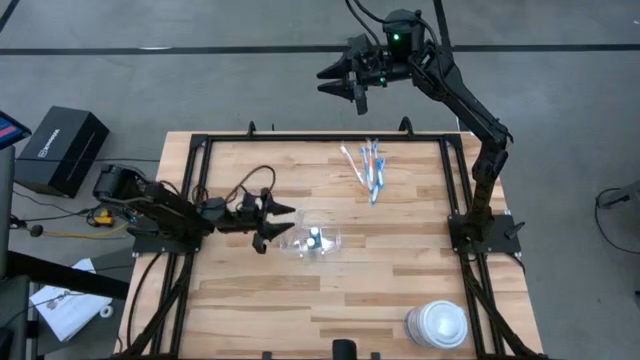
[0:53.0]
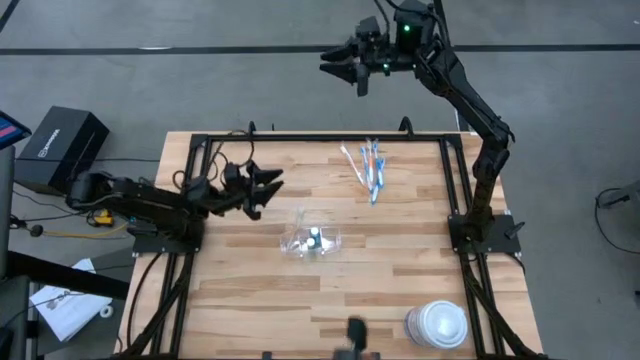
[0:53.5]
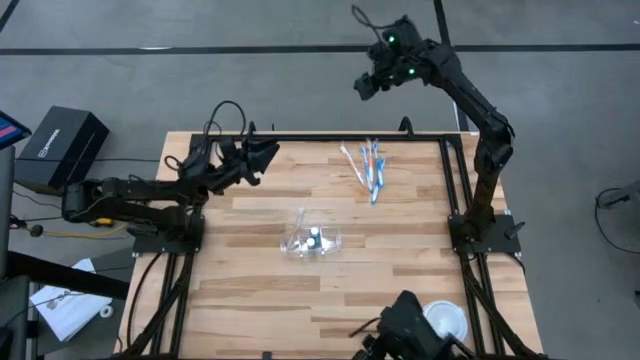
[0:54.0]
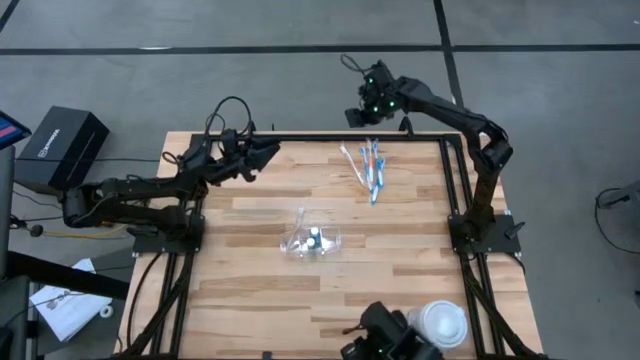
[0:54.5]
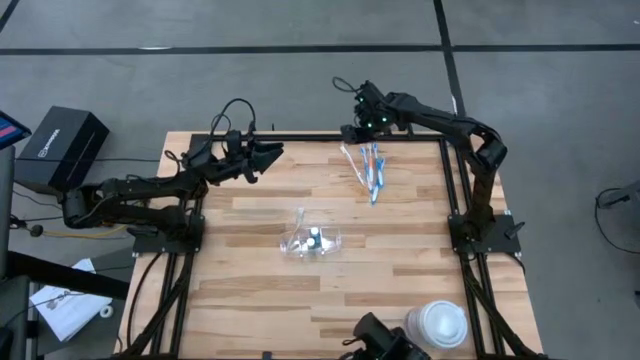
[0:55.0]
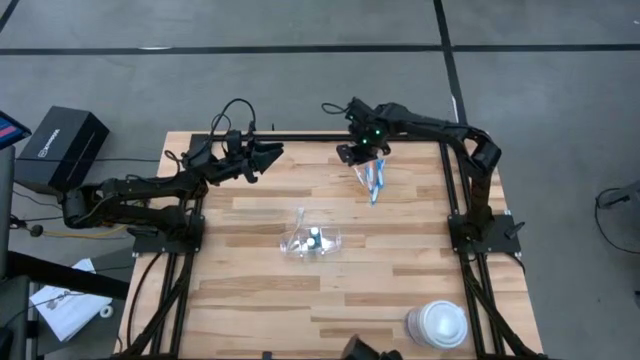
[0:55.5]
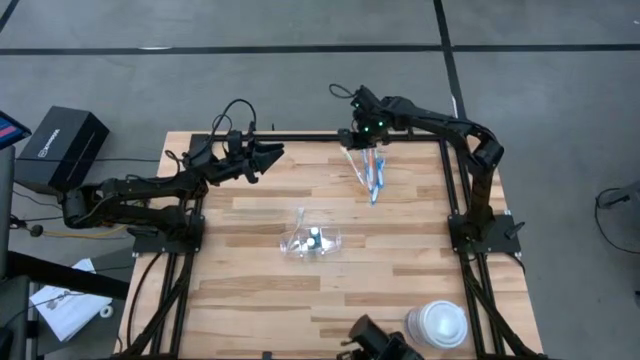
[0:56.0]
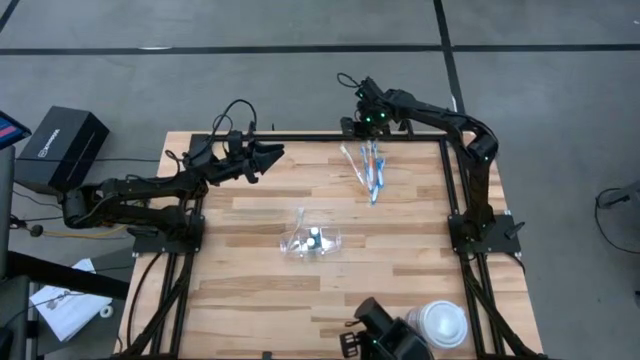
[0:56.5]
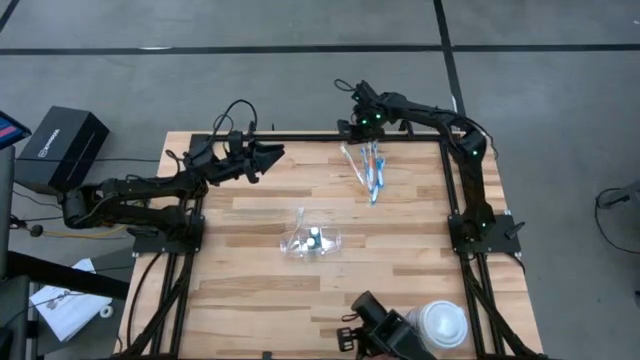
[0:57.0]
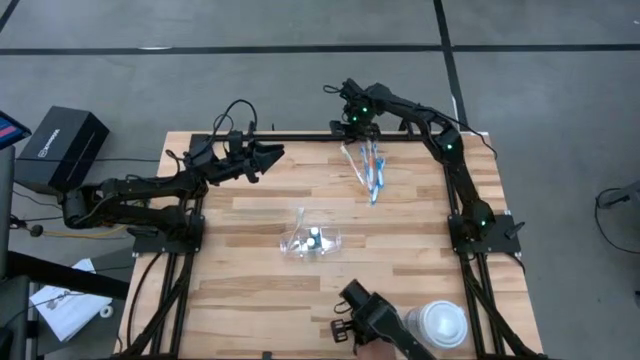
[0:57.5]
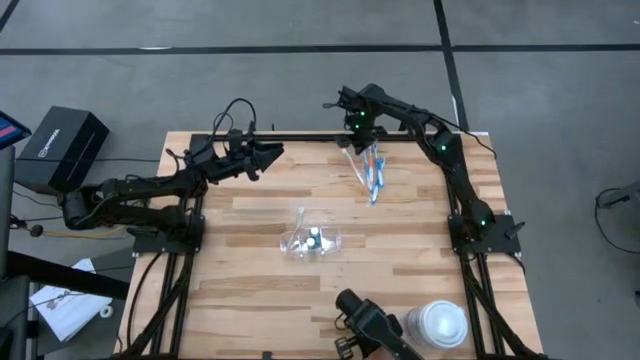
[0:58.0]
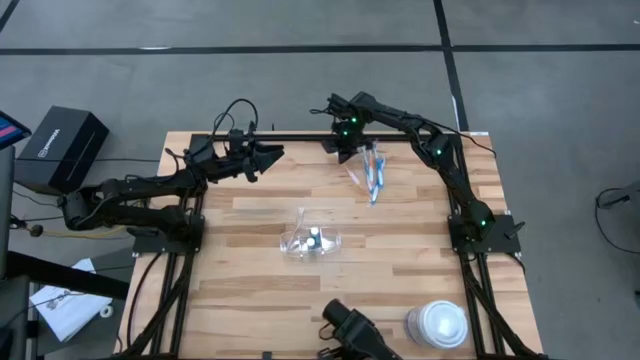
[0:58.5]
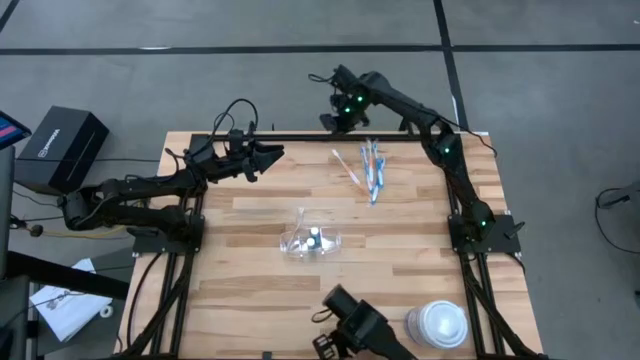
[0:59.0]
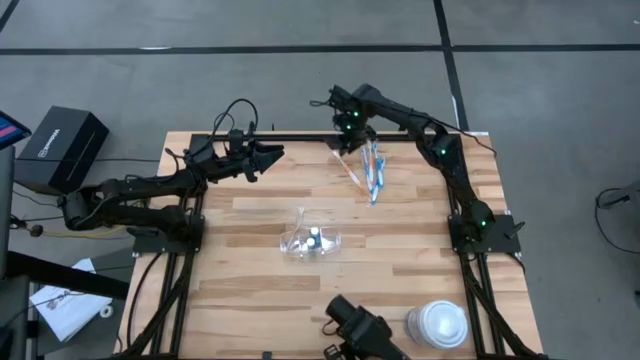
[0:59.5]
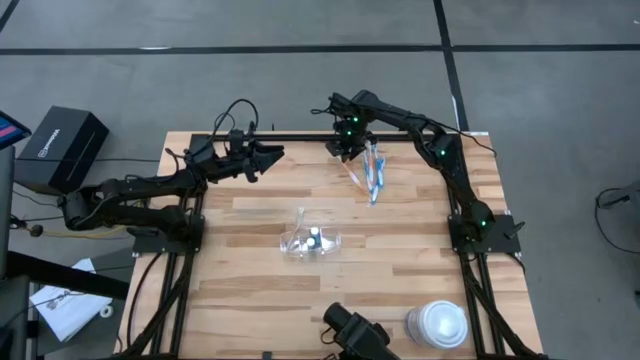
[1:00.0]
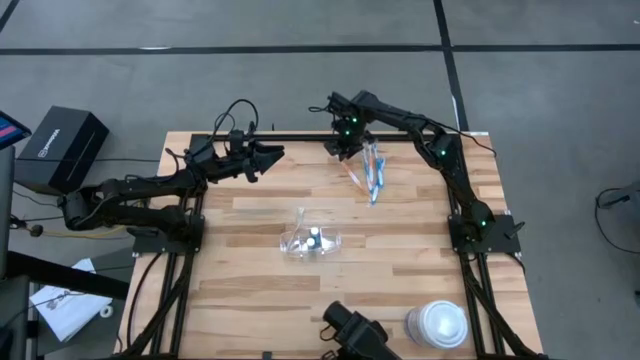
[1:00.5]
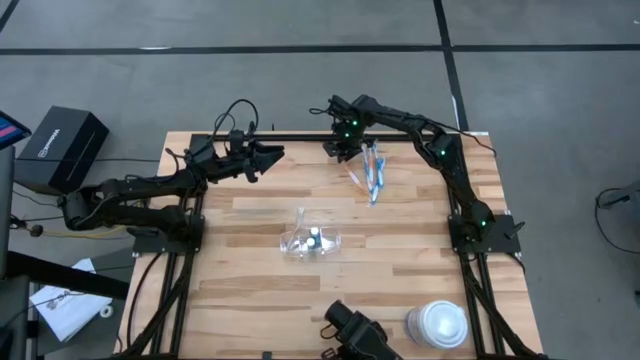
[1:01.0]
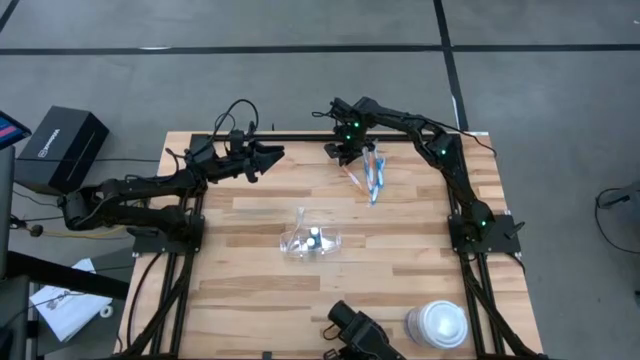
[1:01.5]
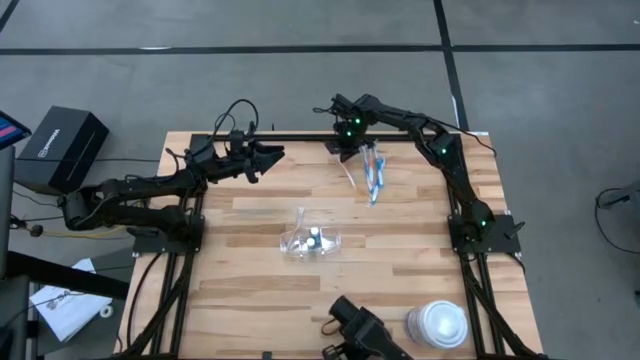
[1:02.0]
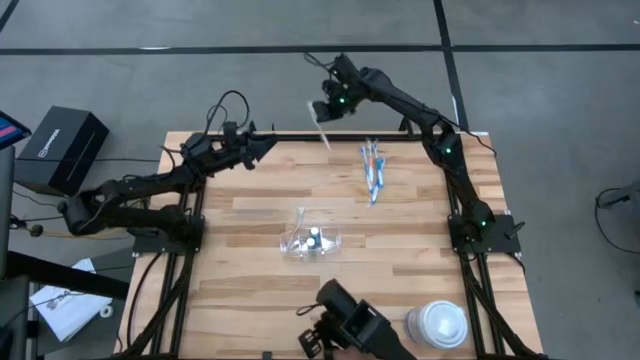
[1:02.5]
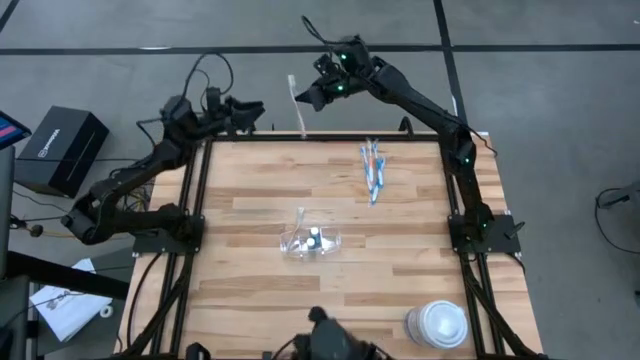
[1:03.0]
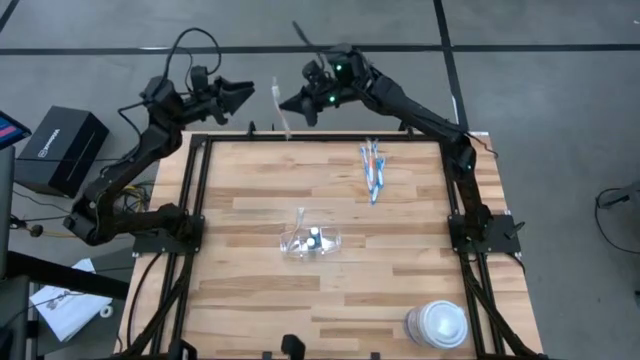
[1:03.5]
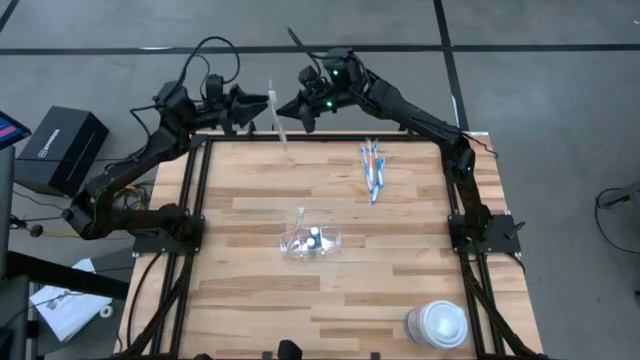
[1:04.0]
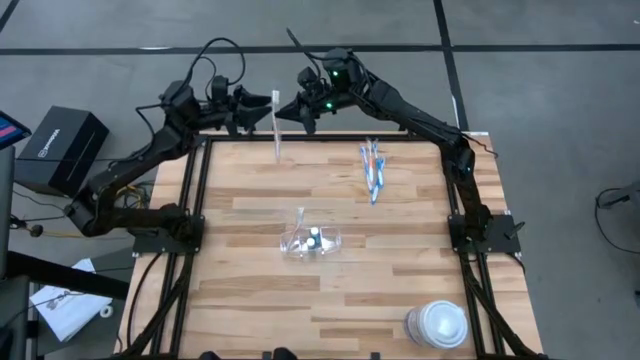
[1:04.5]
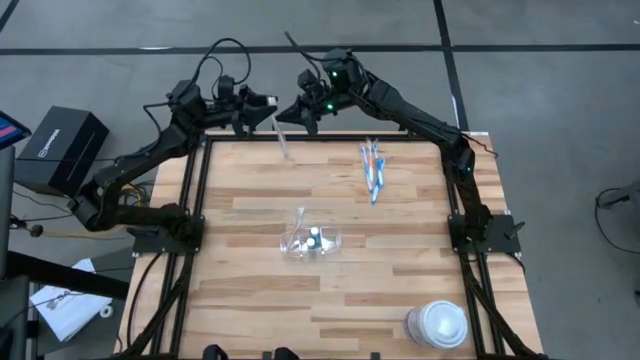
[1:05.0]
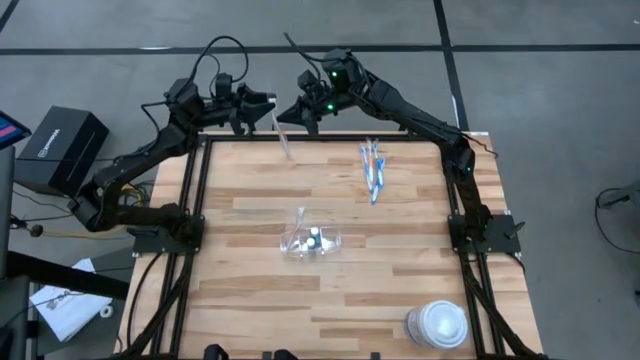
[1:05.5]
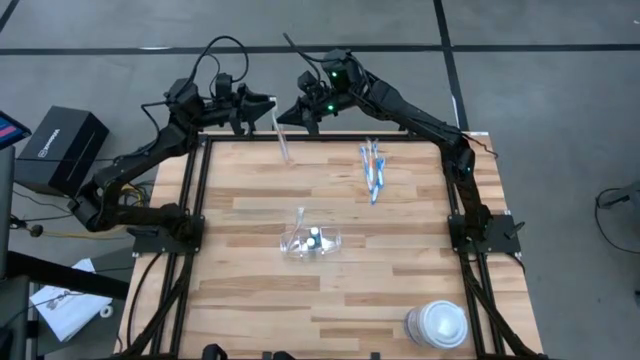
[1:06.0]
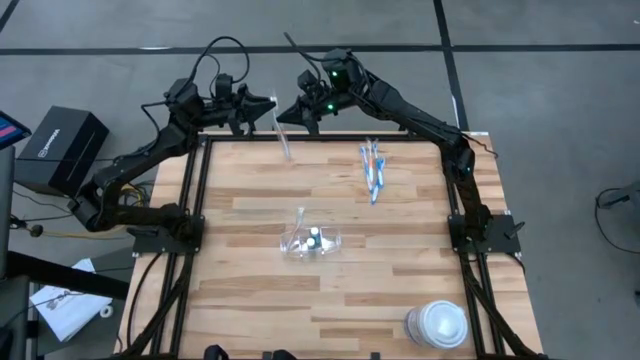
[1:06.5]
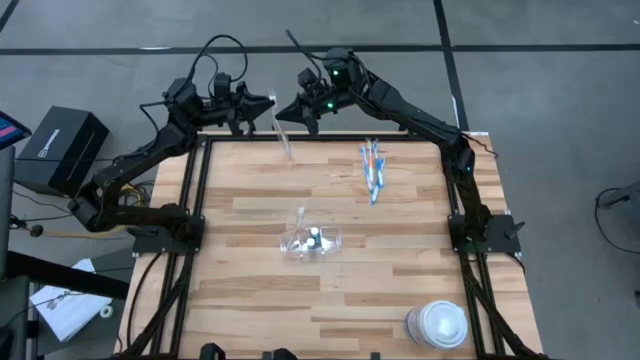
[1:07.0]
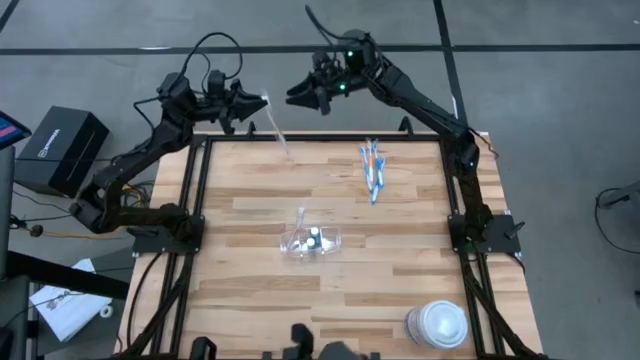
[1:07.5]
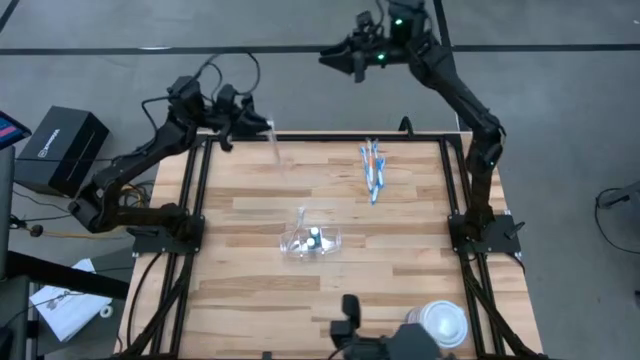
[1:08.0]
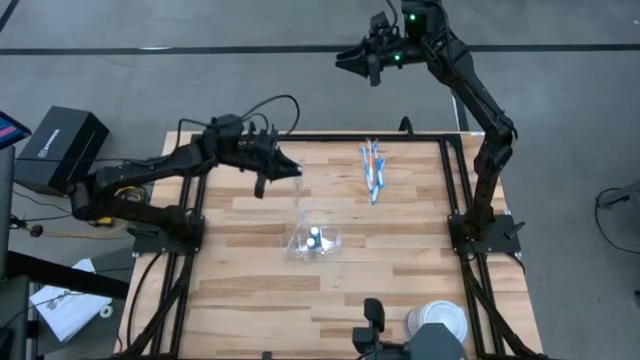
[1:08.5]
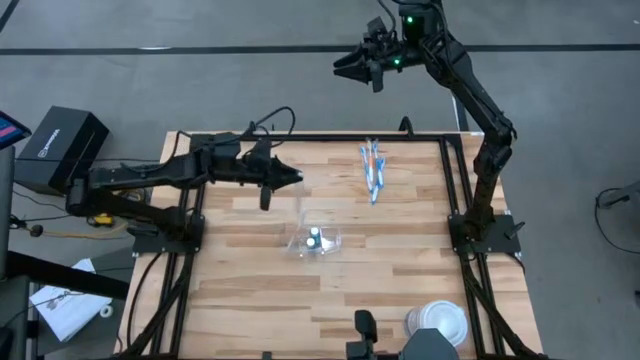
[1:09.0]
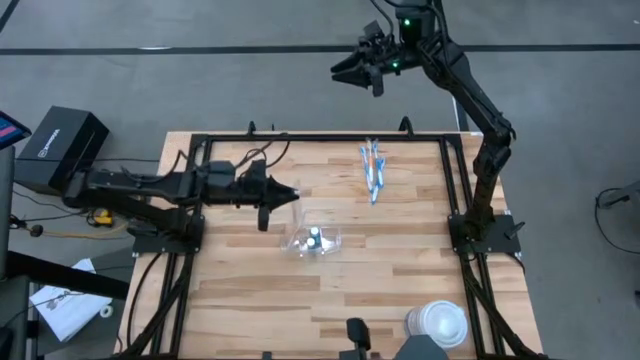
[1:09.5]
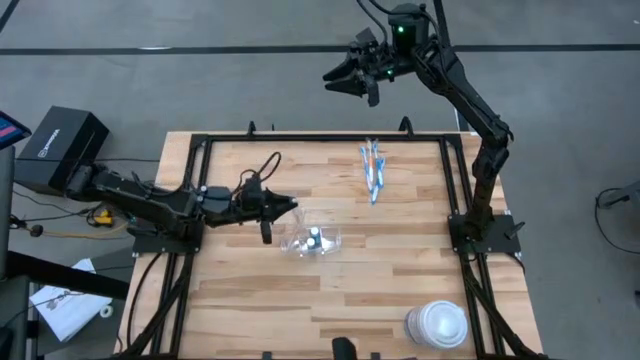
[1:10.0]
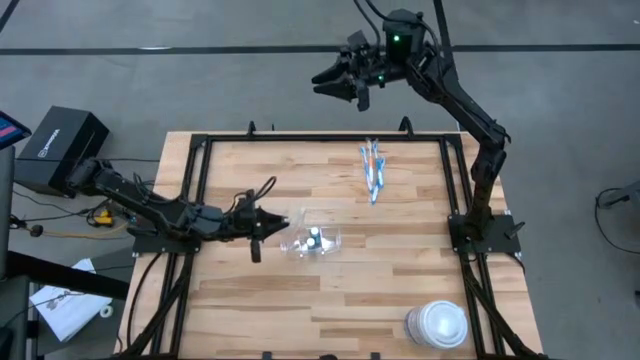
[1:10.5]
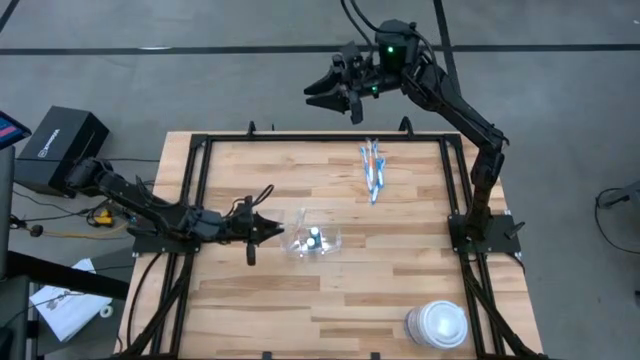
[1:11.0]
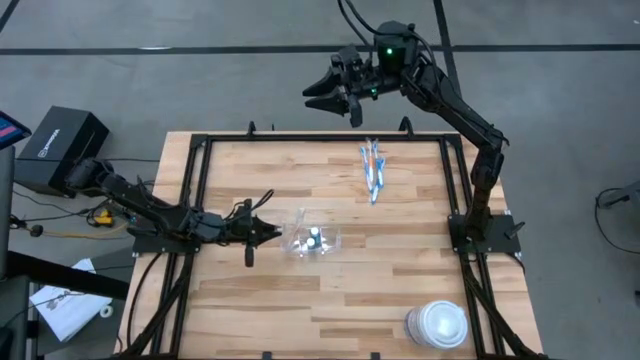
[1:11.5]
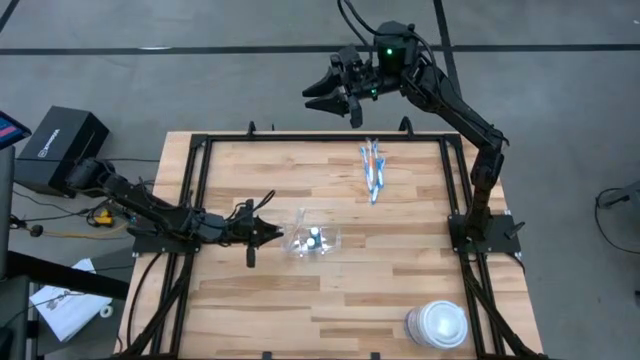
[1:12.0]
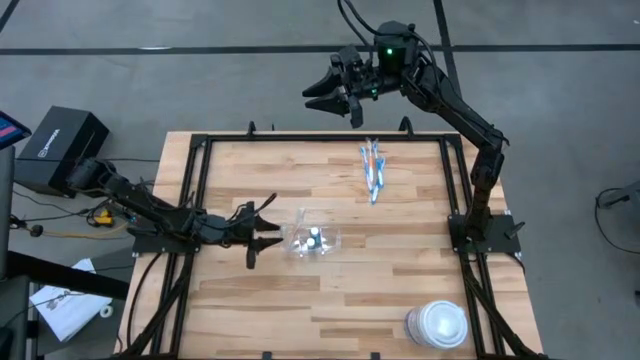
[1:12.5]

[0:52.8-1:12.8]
Task: Pick & Place toothbrushing station
Put the left orange toothbrush into the transparent organizer

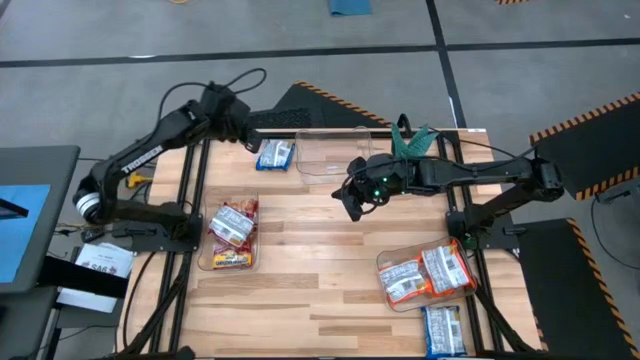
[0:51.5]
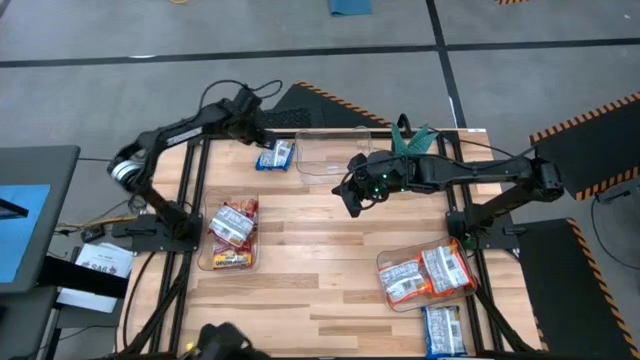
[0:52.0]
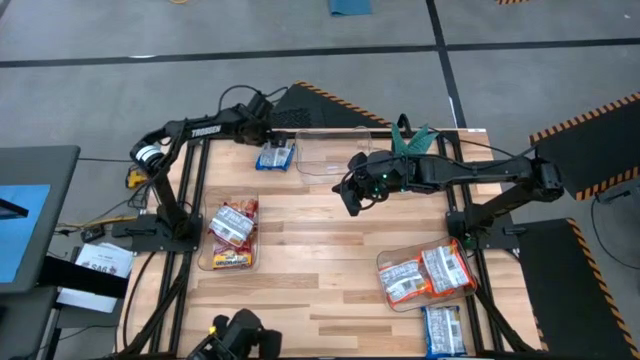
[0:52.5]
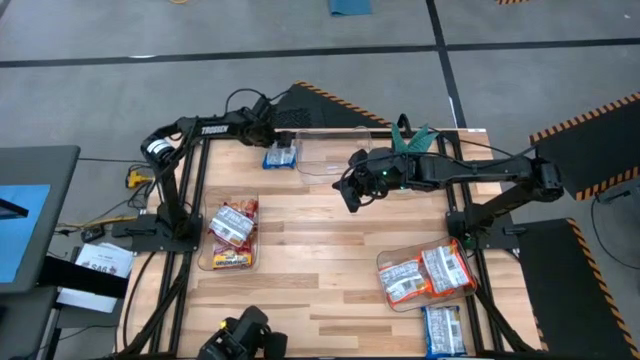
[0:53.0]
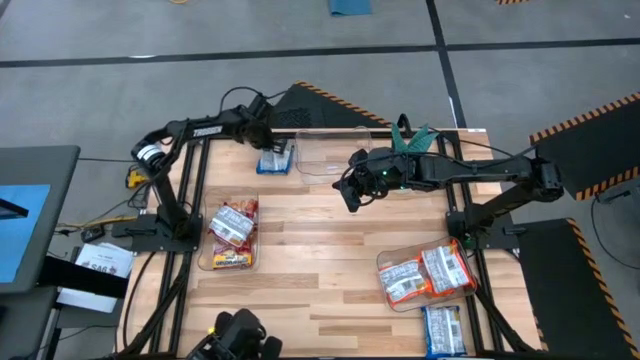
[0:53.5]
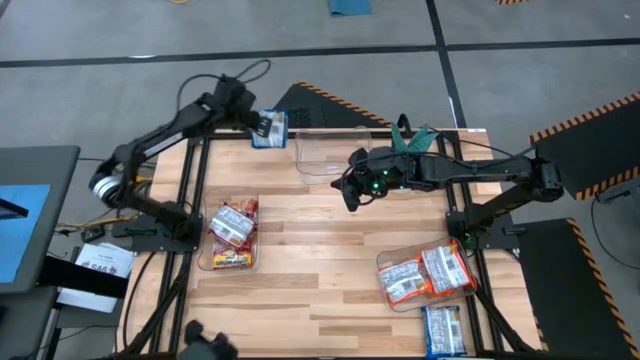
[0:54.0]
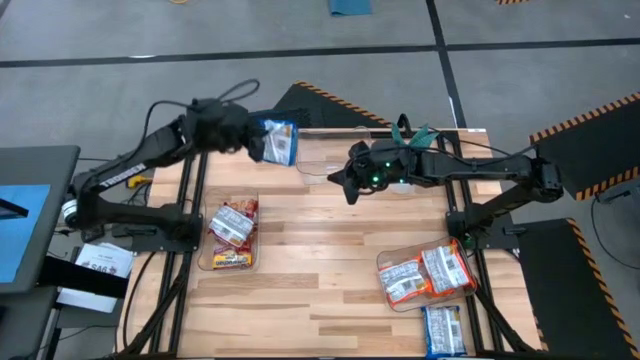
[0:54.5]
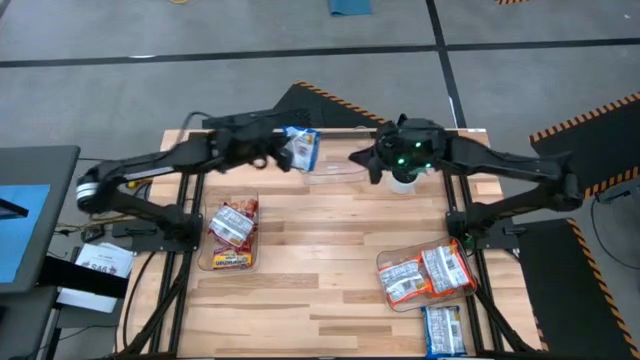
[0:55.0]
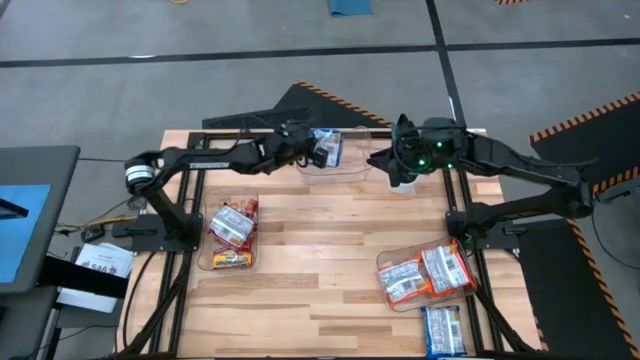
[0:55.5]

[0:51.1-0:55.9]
Task: Sort Maruchan noodles
Put the top blue noodle pack into the top transparent bin
